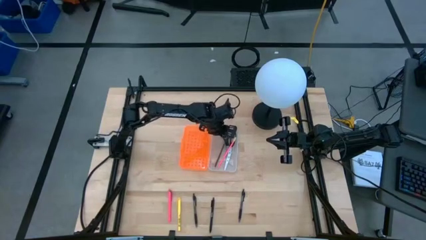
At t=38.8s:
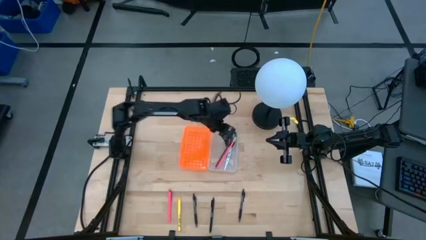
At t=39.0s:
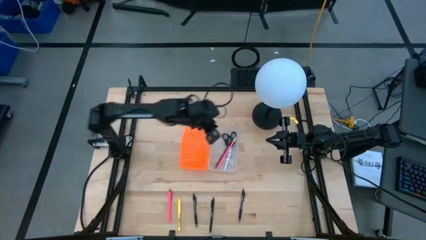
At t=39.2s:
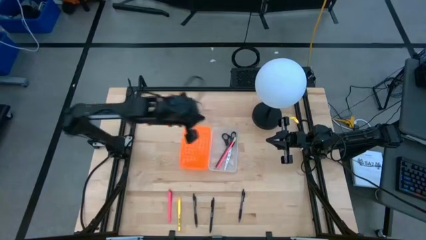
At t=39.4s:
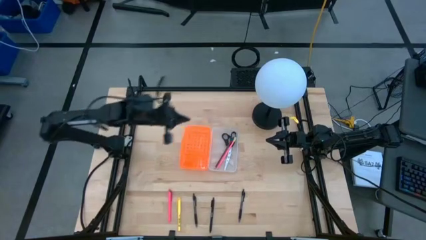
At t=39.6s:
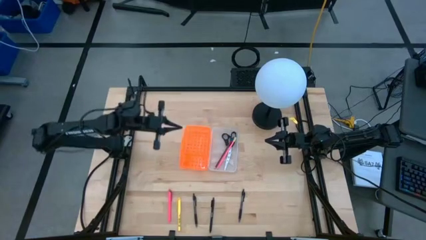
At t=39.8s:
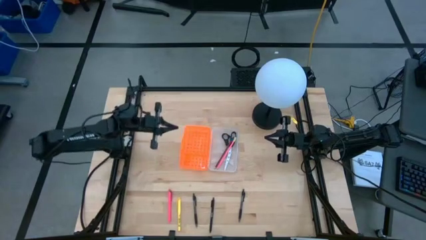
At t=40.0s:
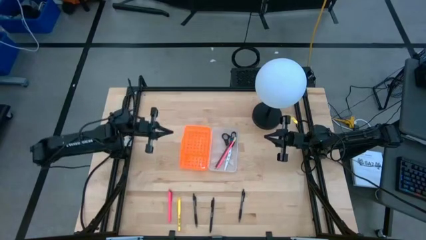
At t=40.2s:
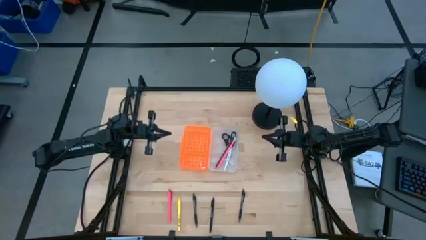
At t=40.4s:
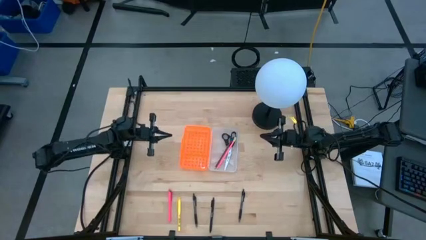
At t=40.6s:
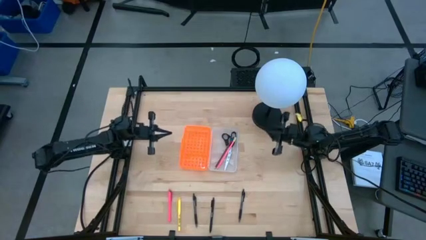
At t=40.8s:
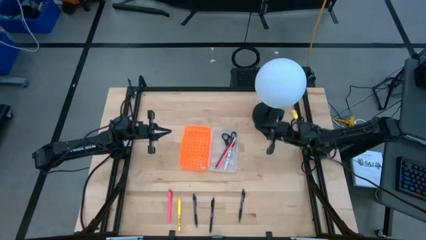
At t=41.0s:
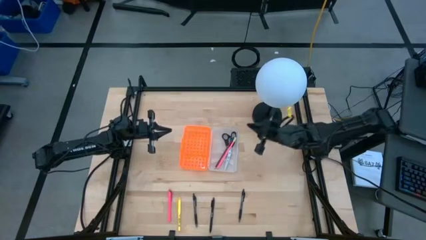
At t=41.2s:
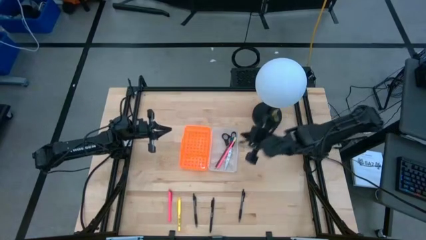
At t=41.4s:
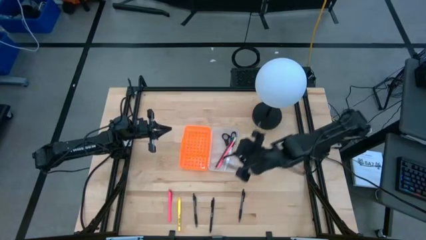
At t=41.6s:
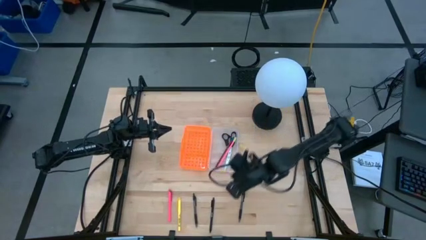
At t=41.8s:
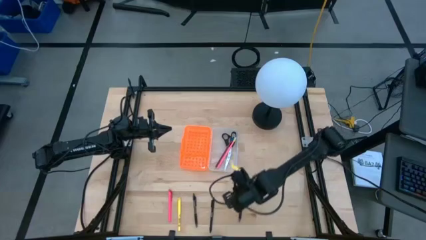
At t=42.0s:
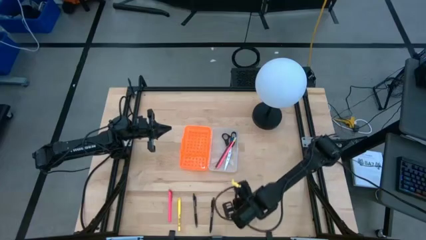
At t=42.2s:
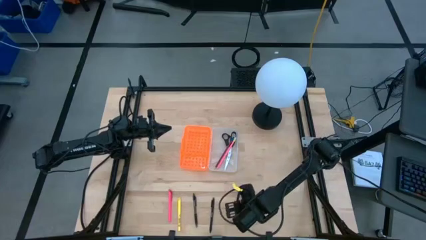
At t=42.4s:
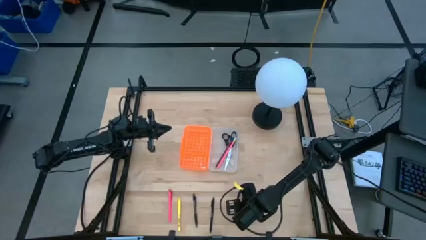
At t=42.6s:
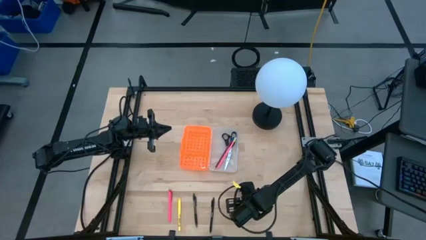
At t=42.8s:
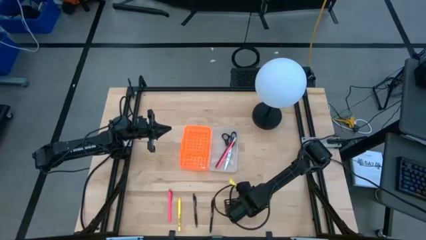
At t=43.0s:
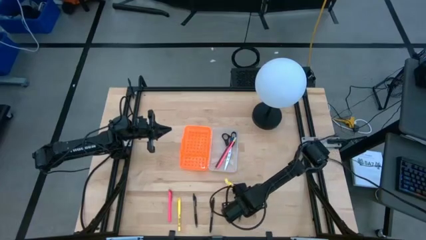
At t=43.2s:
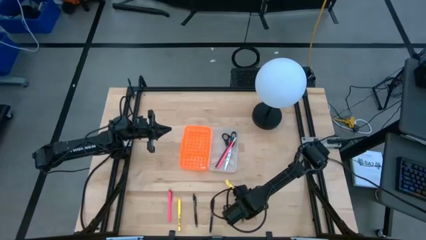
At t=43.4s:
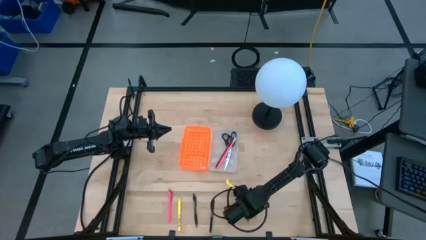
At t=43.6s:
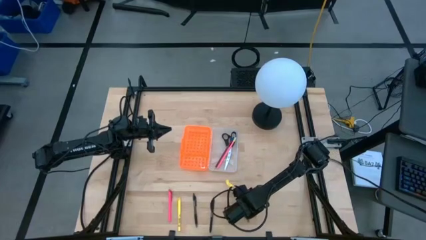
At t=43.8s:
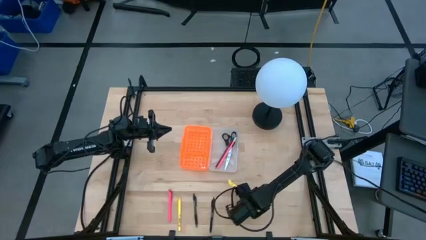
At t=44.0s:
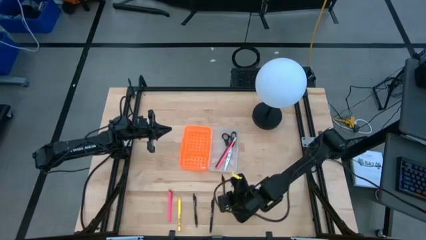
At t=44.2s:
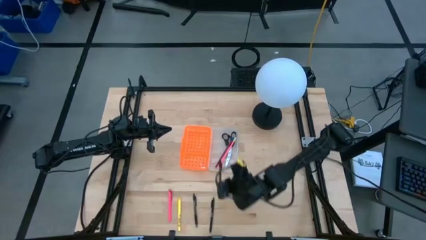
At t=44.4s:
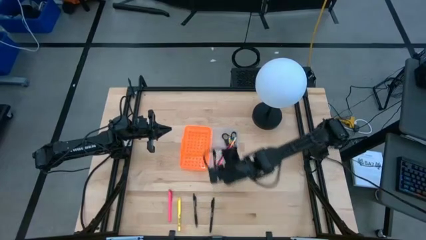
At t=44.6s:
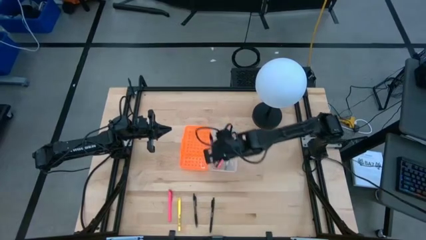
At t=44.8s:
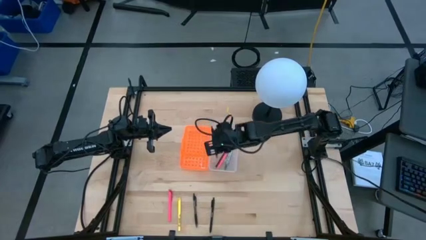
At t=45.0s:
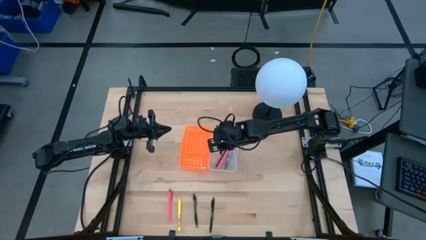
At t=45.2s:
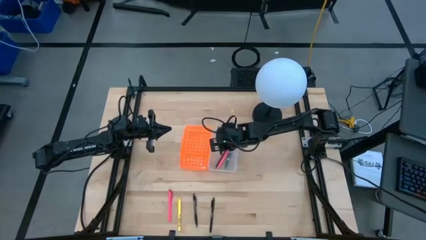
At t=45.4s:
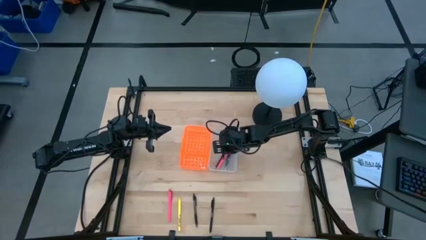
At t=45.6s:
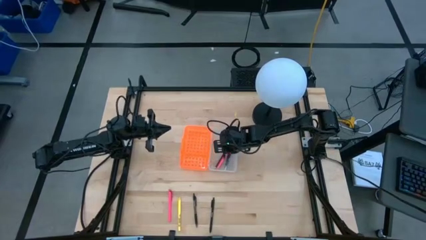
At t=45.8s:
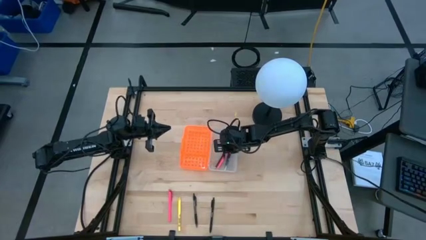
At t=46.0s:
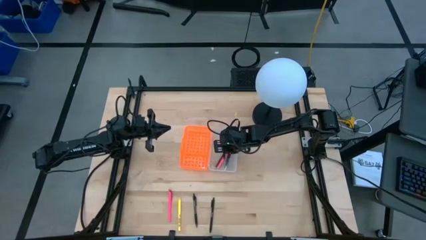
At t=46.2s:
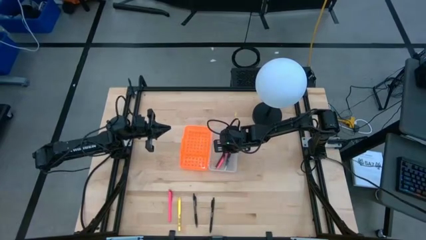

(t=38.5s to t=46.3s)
Task: Pick & place school supplies into a supply box
Put the right black pen into the orange box

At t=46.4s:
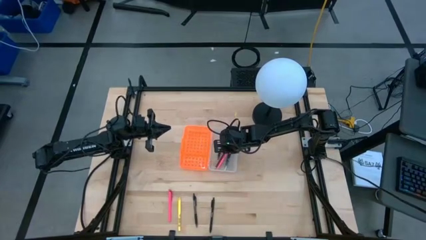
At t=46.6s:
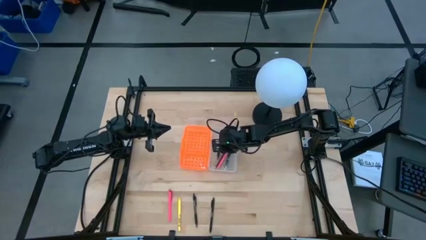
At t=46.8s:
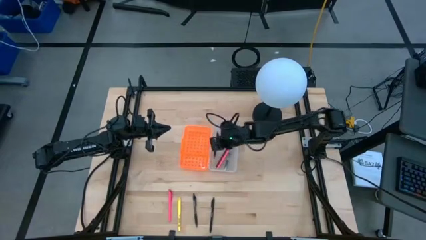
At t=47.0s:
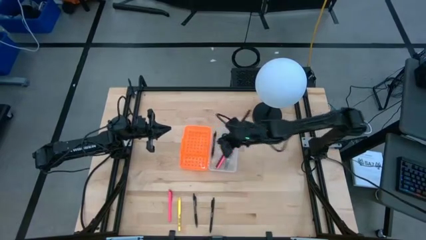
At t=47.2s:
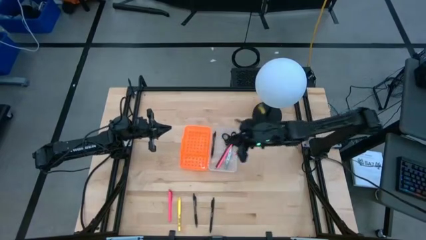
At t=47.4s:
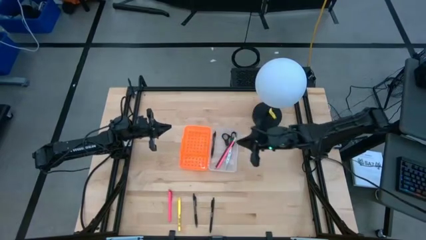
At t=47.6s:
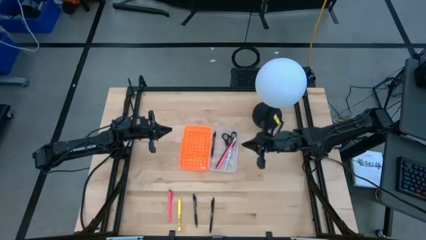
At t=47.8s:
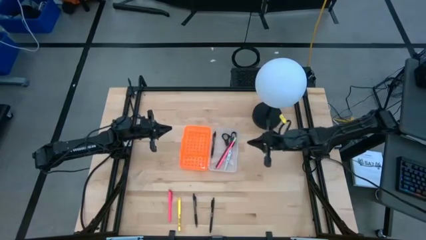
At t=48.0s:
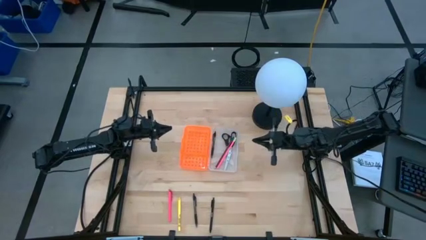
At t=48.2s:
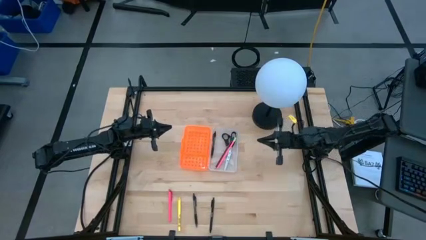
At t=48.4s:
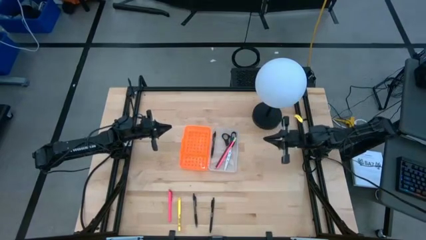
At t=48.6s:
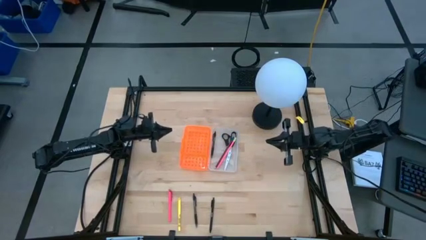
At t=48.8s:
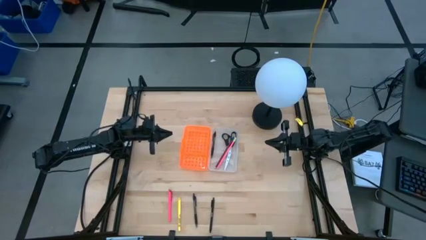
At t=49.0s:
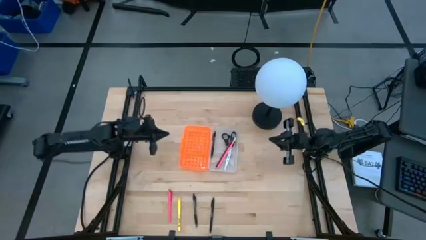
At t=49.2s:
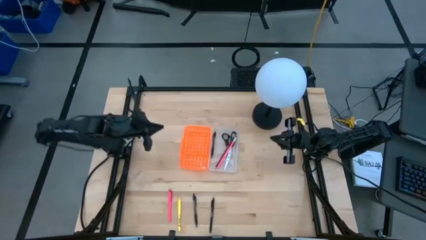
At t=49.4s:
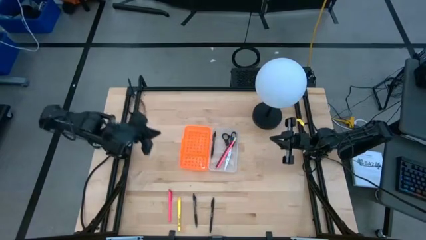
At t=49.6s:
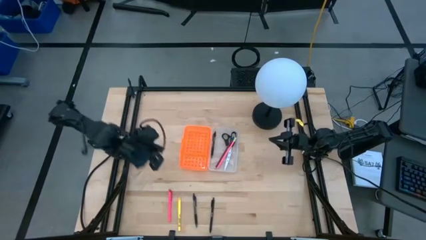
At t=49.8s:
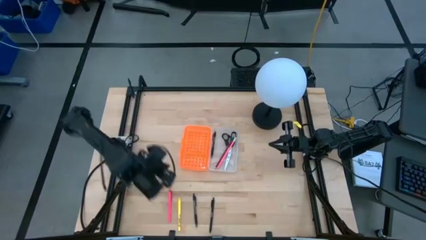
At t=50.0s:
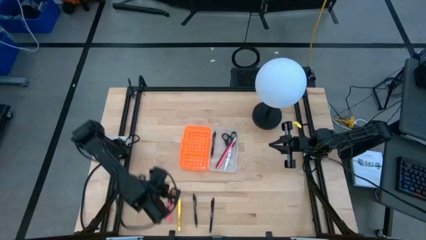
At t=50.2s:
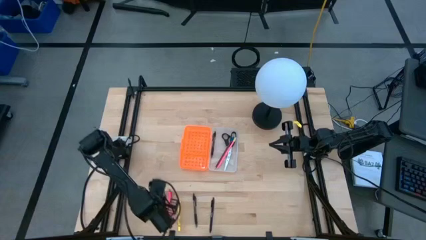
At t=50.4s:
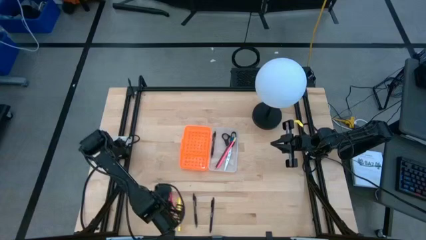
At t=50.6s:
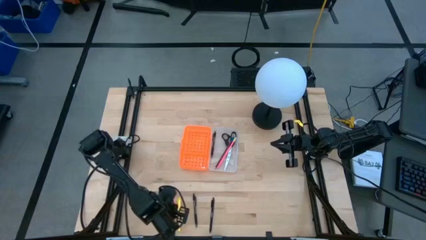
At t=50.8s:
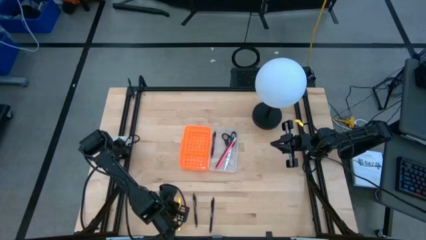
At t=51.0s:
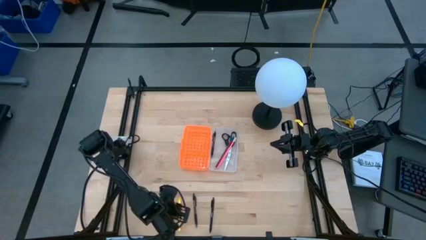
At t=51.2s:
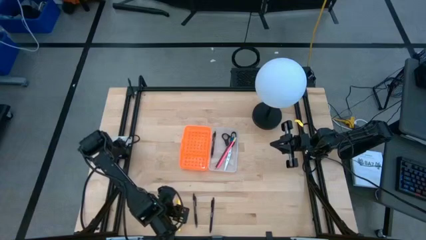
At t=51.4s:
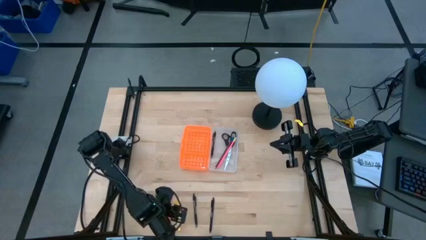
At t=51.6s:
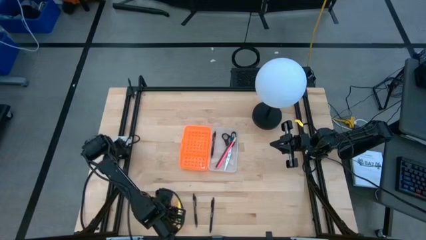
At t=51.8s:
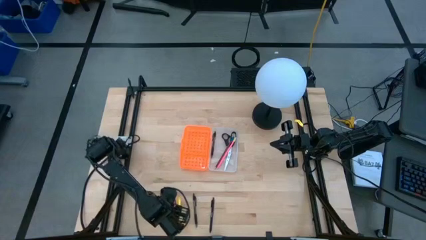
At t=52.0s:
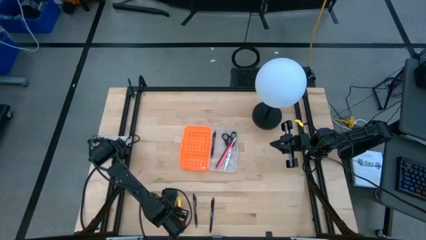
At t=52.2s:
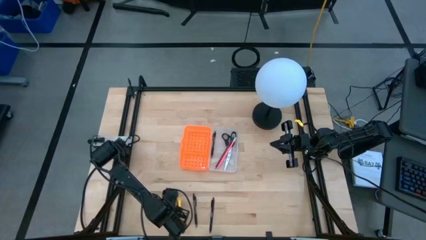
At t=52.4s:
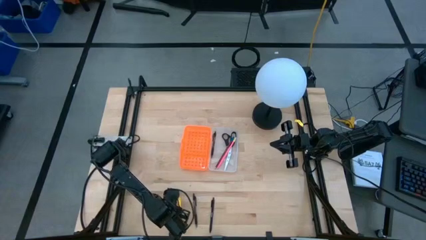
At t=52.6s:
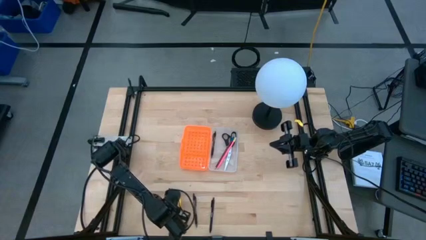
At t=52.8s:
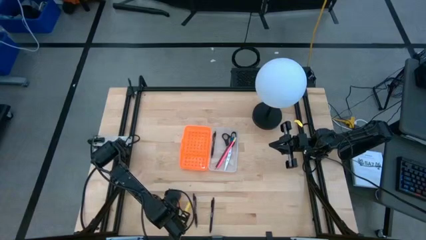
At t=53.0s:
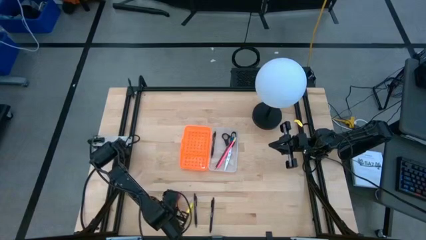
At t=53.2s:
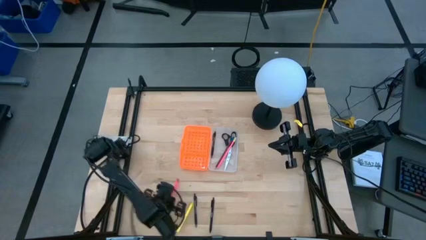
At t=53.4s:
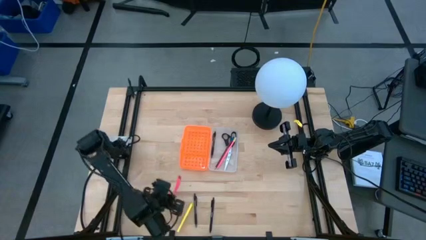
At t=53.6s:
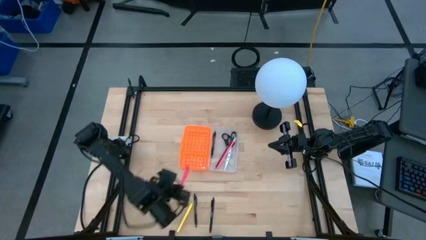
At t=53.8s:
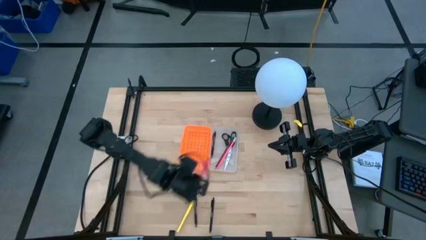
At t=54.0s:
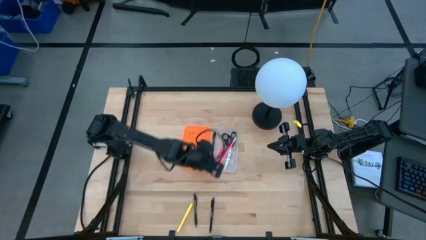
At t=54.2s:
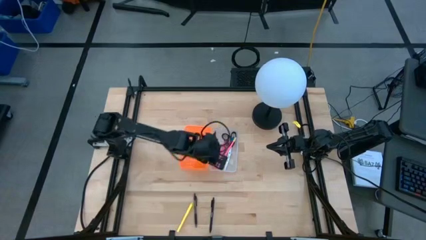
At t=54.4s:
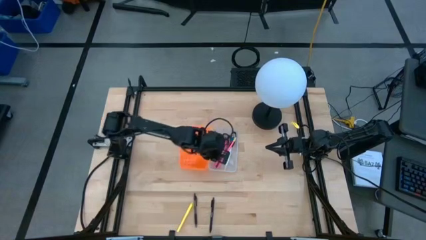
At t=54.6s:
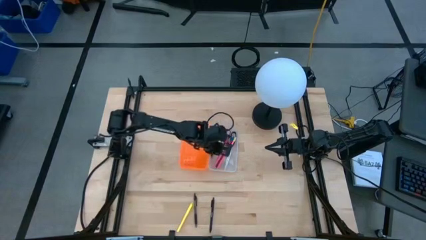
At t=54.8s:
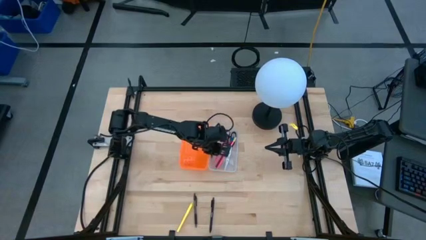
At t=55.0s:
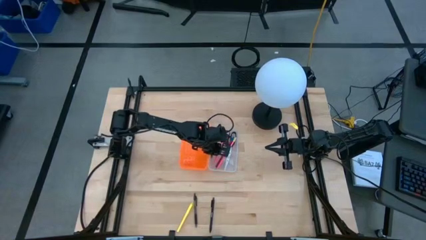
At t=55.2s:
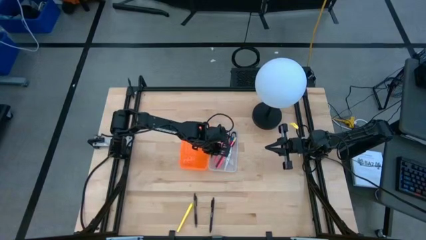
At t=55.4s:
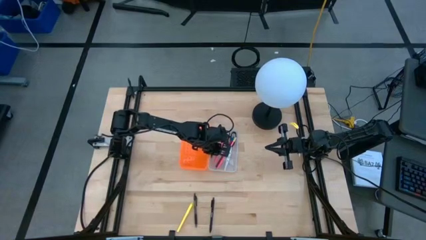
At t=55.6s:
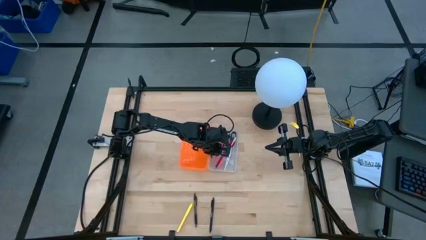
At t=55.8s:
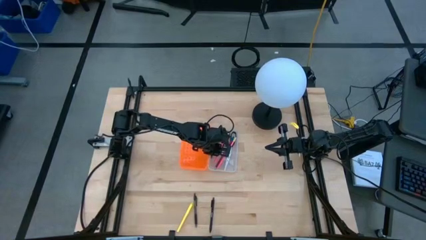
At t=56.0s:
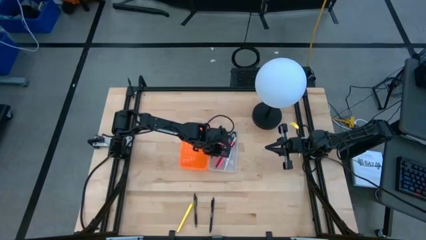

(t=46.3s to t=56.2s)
Put the pink pen into the orange box
